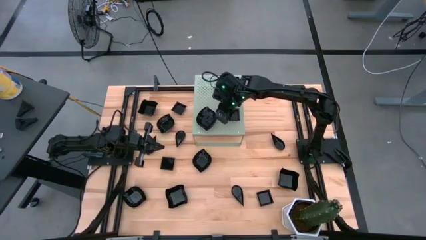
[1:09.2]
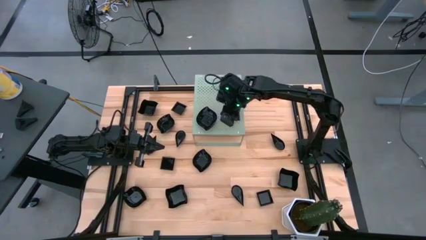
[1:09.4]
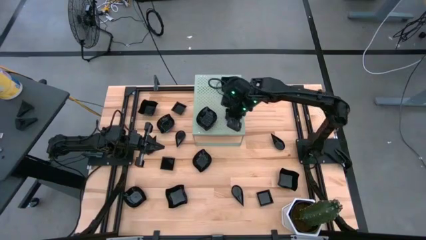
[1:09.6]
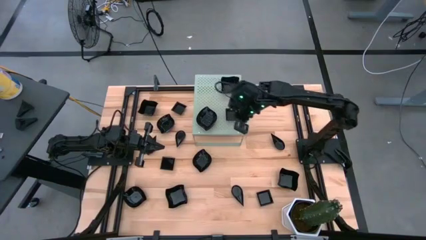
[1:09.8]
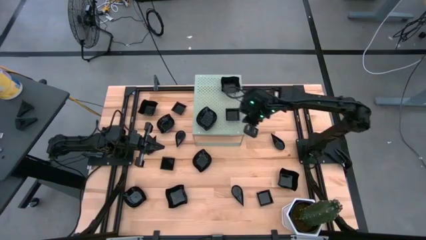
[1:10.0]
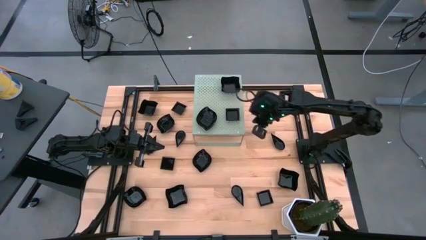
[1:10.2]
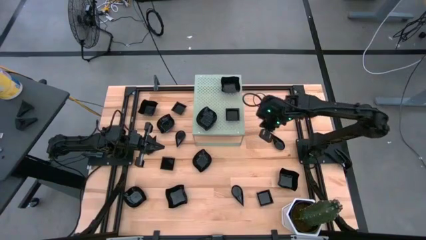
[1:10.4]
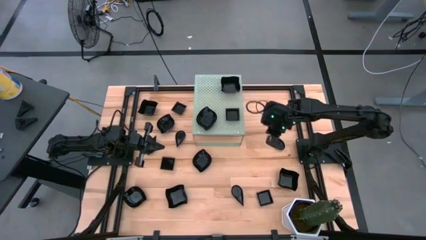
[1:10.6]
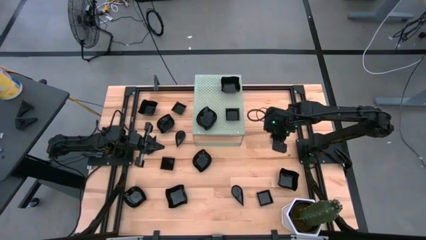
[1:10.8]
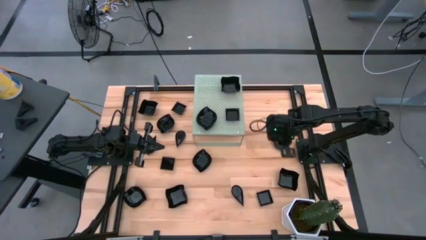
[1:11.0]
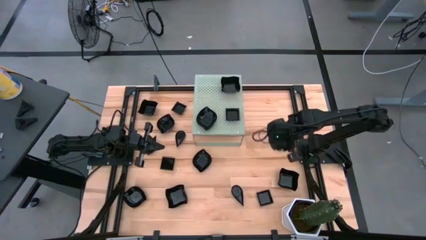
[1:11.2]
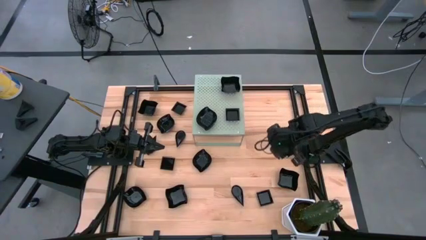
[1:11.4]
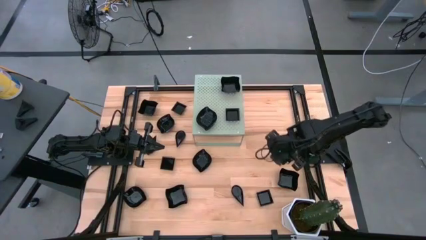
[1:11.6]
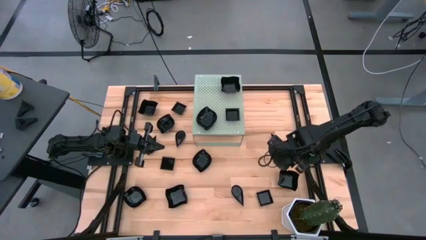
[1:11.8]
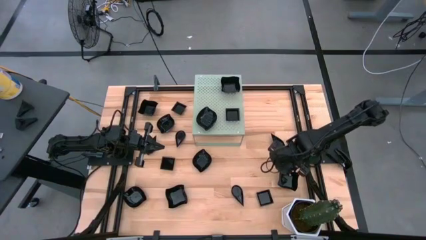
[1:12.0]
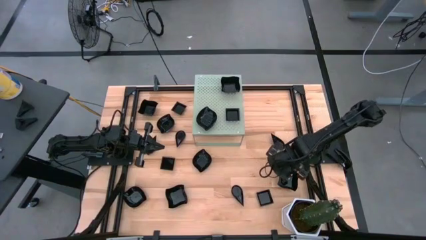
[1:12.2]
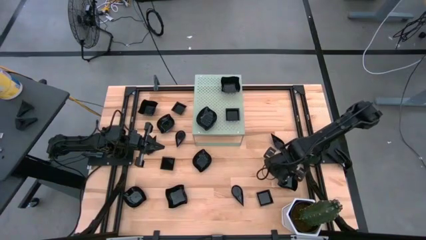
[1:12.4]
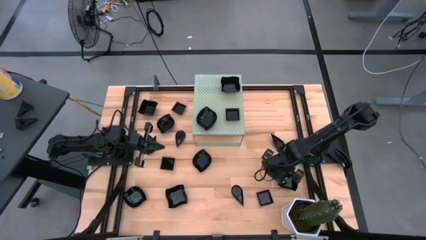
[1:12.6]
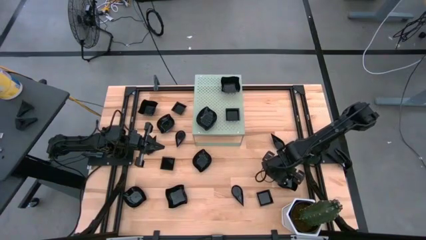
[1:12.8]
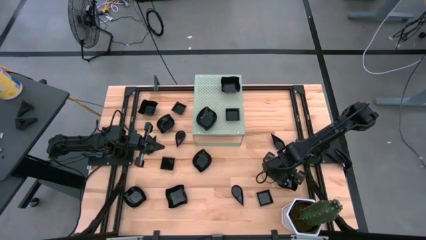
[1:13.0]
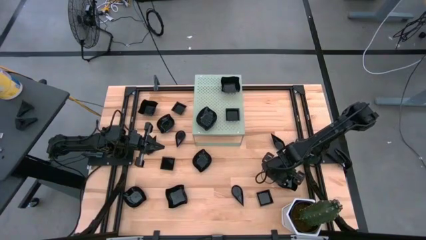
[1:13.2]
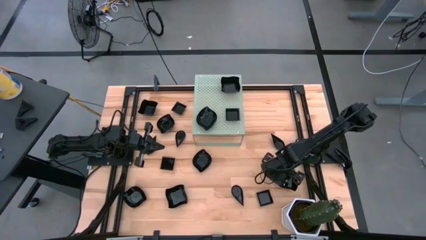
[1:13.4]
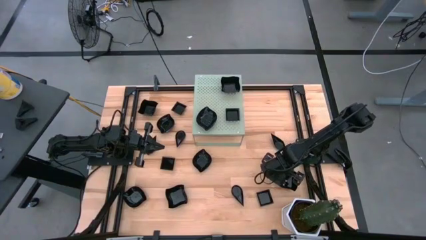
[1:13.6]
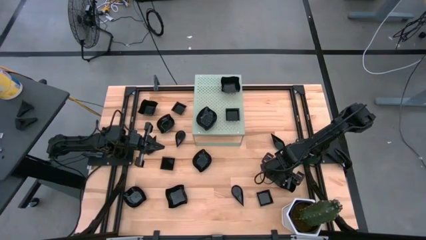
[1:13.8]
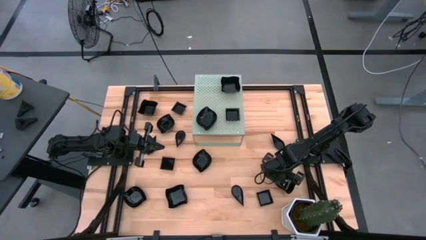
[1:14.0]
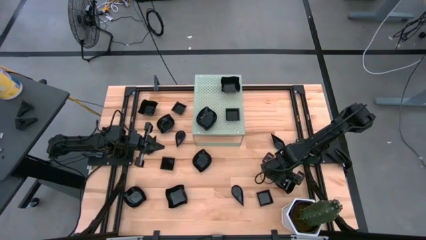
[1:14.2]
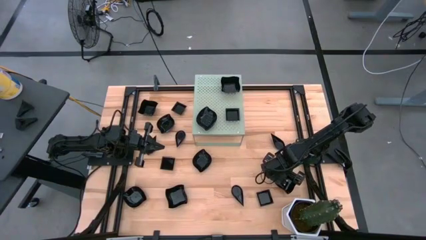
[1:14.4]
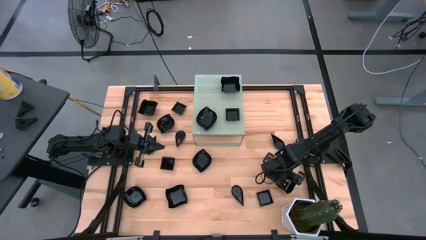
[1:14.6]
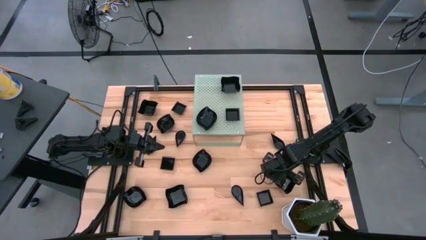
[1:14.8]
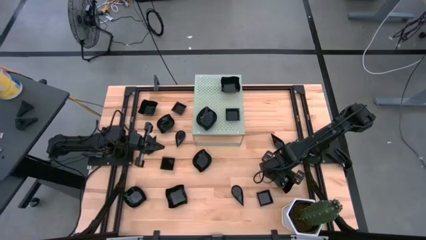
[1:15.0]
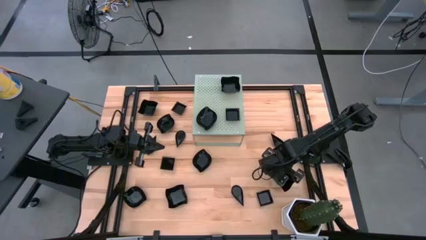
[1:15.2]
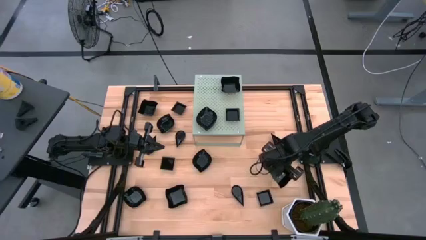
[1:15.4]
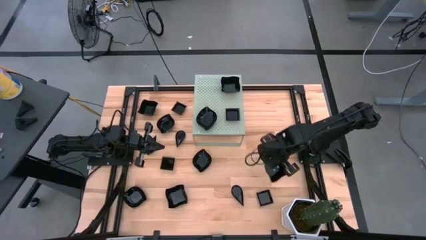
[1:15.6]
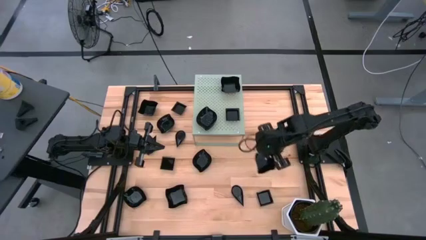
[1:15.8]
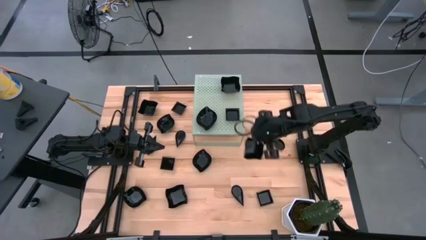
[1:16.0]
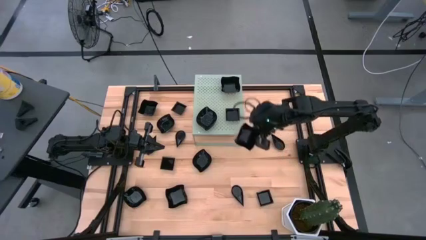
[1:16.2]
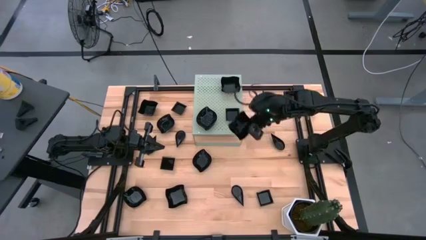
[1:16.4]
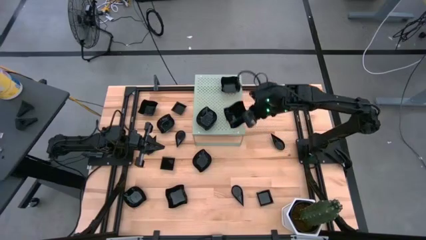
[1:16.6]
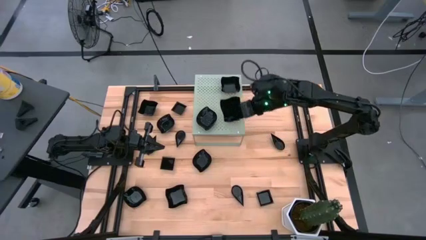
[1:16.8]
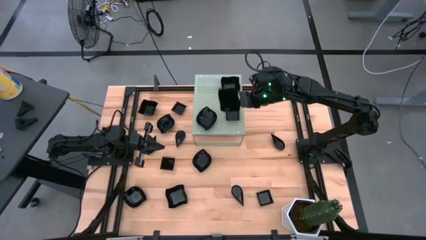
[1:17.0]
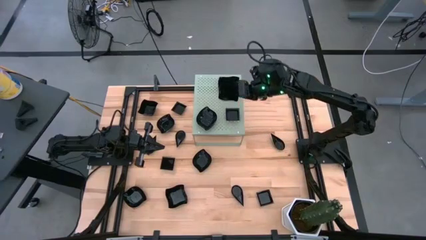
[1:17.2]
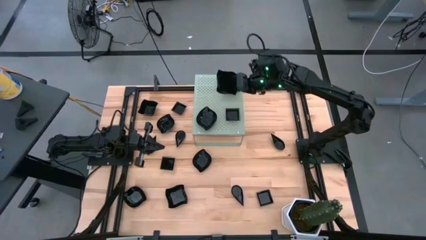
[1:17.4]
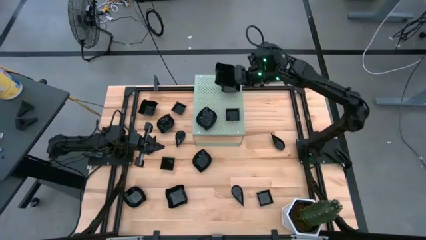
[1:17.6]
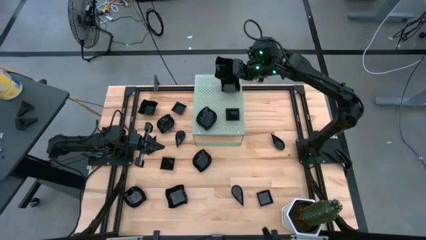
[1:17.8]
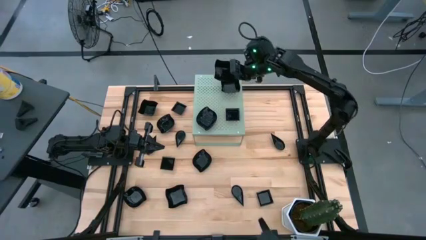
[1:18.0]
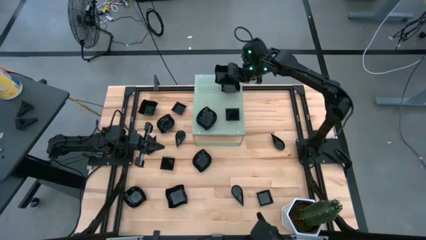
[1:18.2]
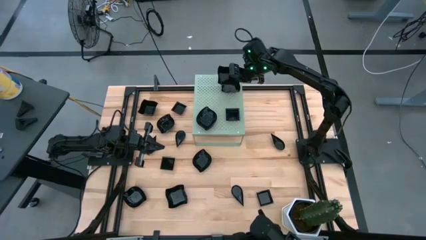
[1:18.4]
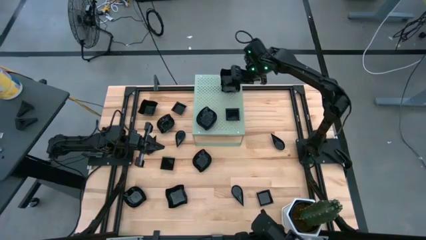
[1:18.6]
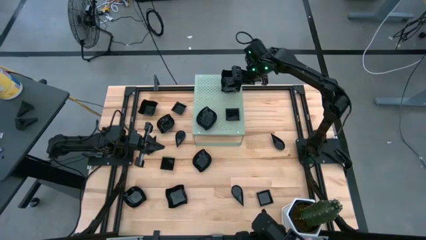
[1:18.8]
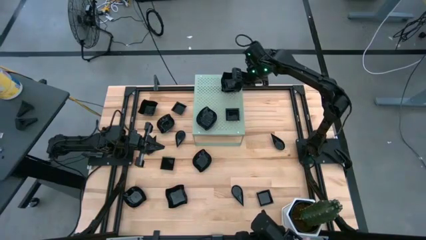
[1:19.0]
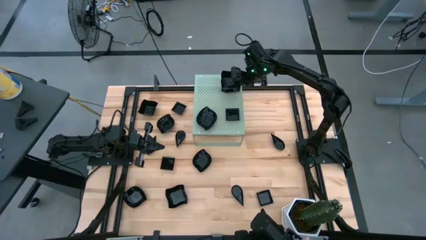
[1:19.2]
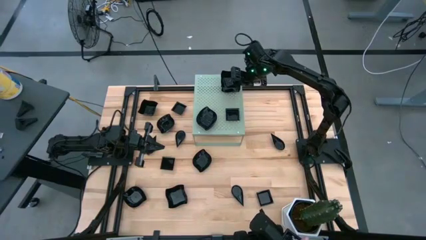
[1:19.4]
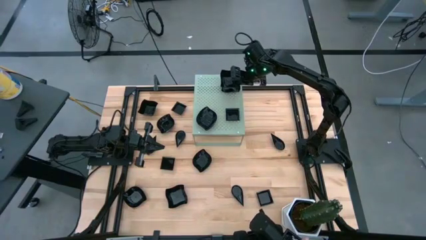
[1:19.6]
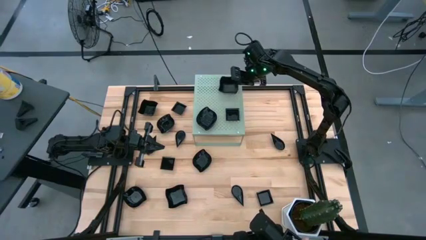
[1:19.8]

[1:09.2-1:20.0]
Task: Pick & Place Mini shaped plates
Stack the distorted square plate on top of the distorted square plate on the shelf

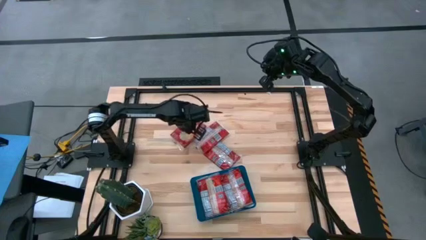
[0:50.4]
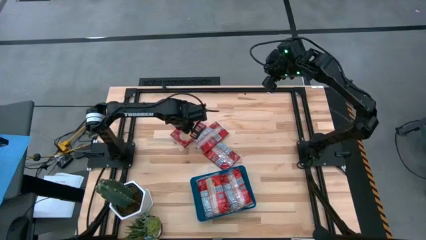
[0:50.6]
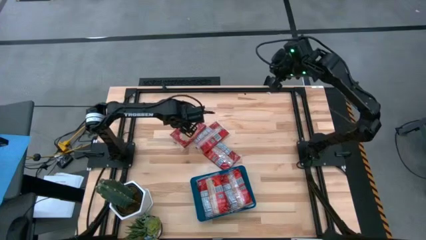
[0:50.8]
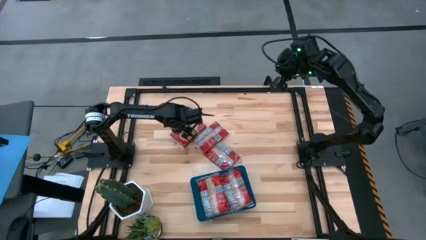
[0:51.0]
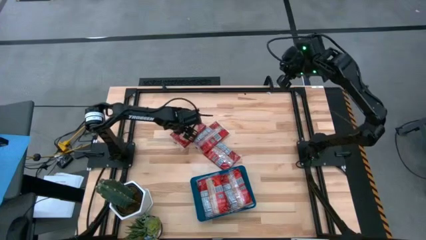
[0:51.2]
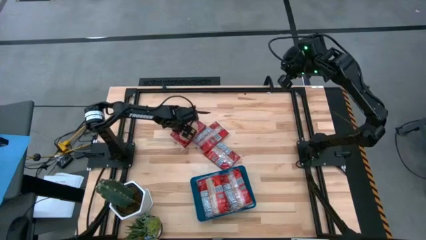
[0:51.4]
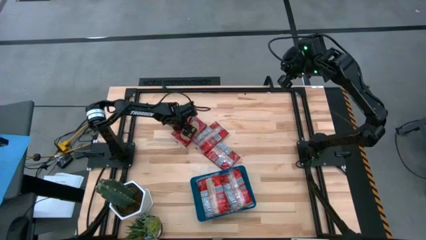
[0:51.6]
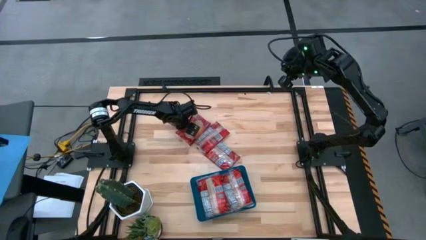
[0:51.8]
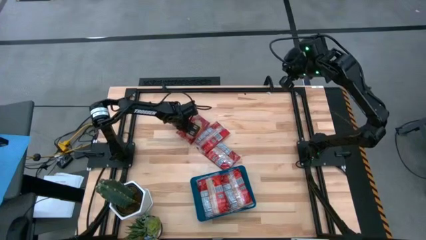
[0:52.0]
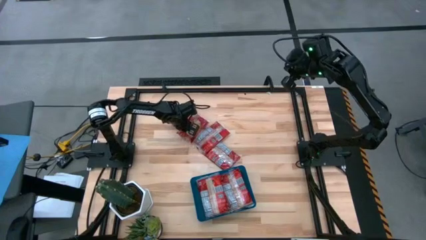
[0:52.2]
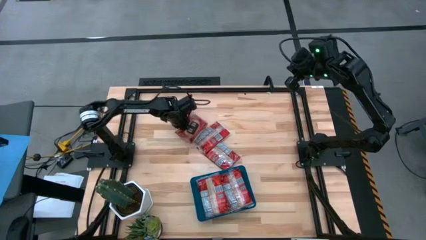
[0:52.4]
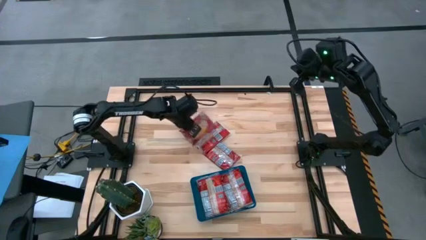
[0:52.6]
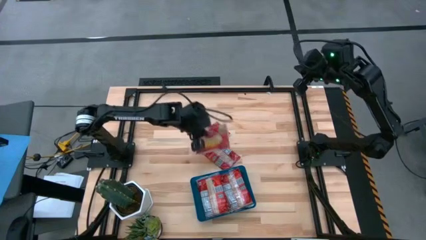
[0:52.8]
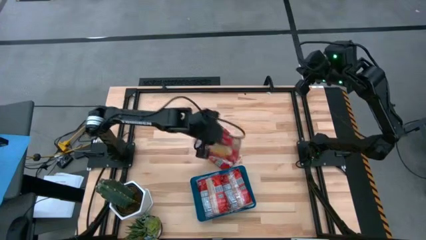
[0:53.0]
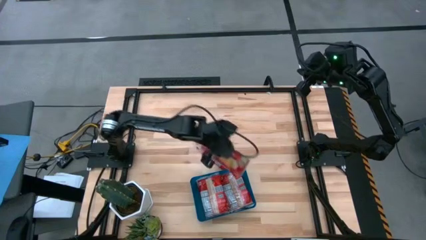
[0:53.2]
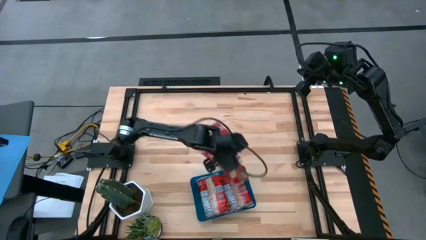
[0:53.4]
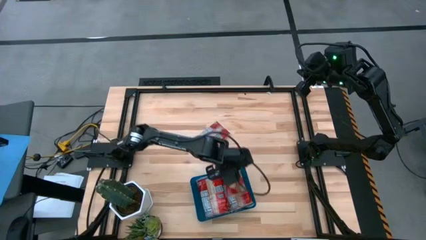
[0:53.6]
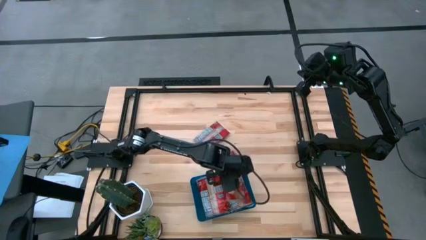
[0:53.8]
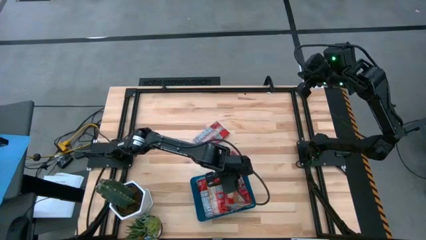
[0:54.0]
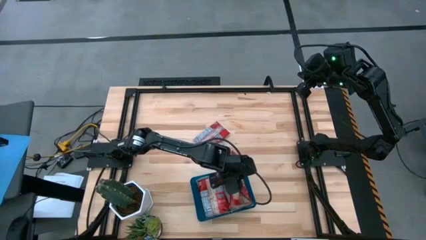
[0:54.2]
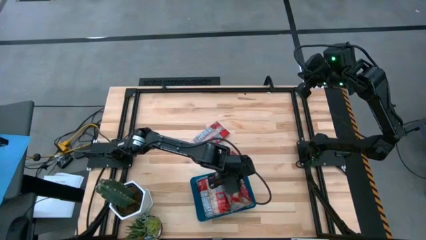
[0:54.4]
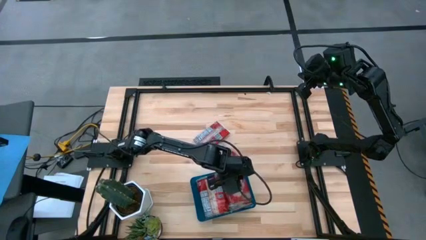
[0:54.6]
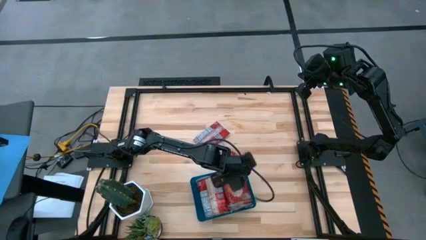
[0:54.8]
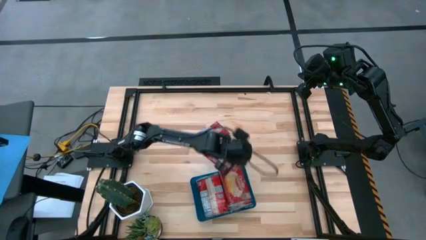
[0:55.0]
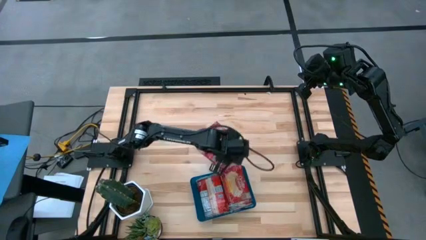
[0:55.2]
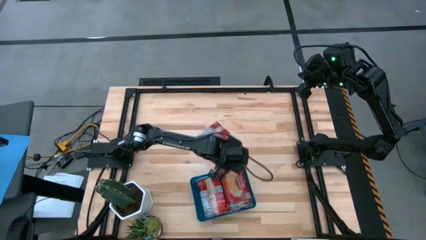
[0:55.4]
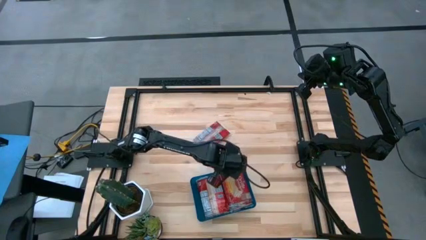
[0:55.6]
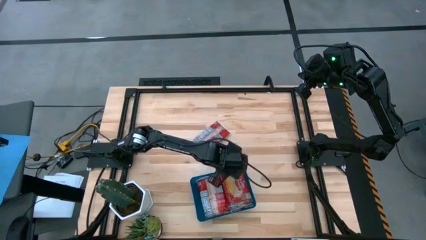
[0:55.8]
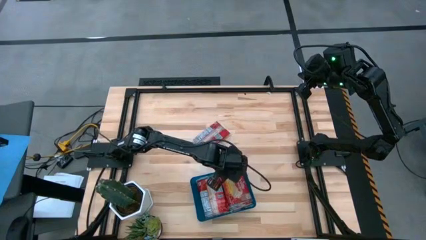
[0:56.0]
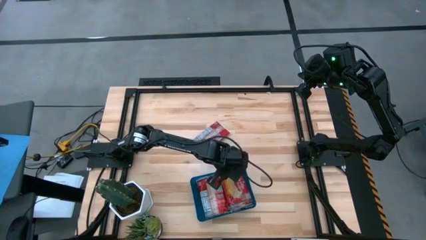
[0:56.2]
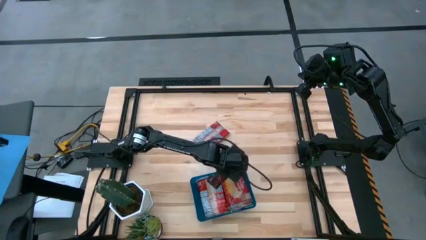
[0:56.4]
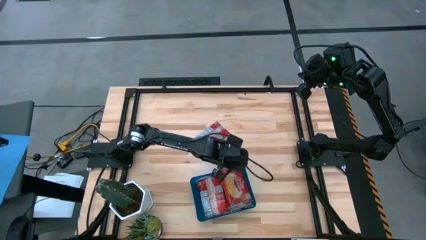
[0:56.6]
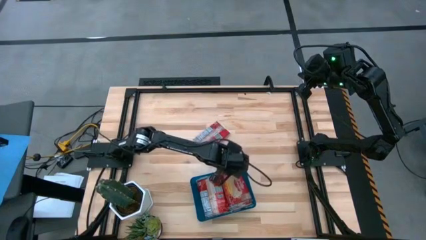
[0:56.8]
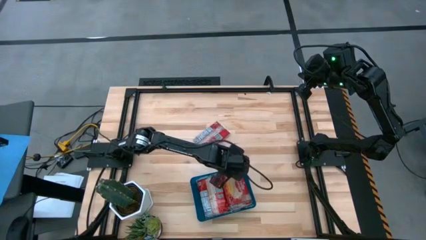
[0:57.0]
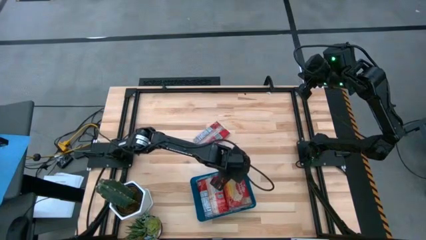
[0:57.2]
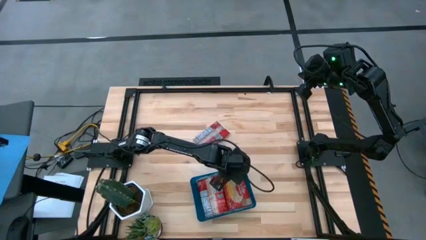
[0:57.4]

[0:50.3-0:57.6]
Task: Sort popcorn bags into baskets
Put the popcorn bag into the blue bin
